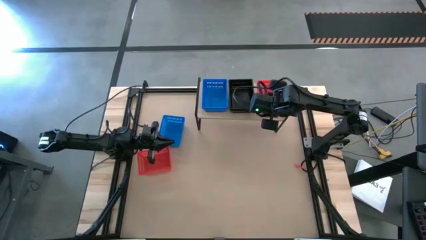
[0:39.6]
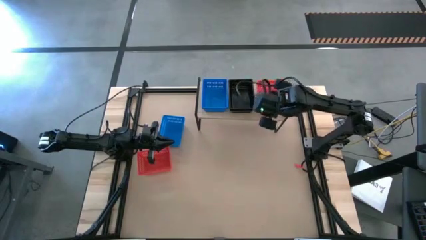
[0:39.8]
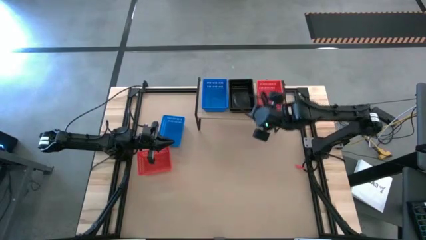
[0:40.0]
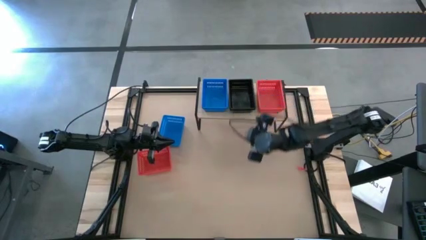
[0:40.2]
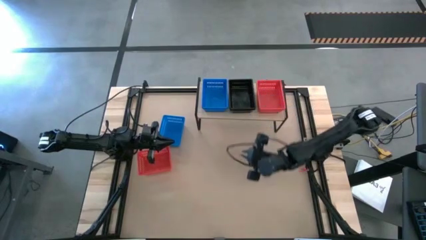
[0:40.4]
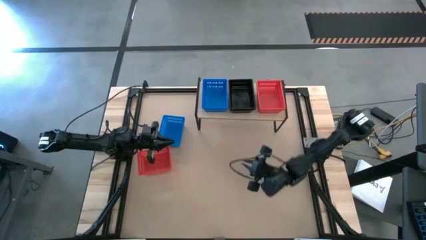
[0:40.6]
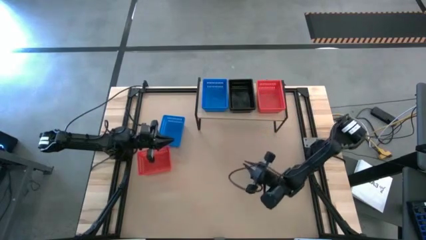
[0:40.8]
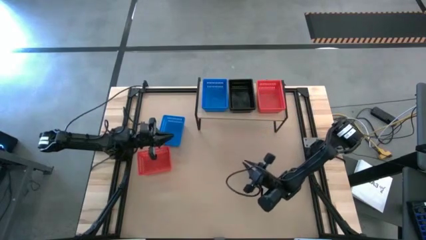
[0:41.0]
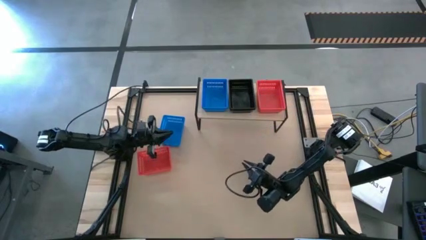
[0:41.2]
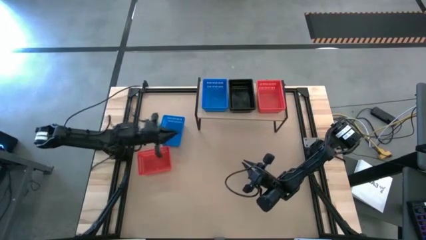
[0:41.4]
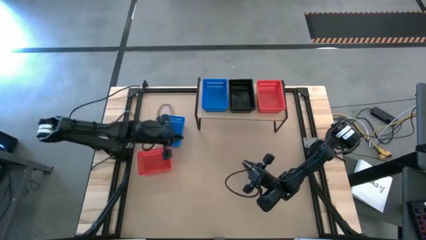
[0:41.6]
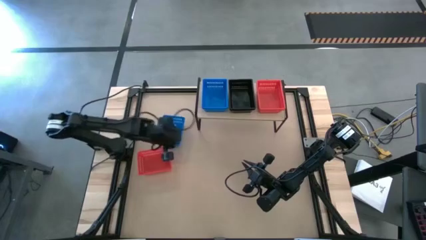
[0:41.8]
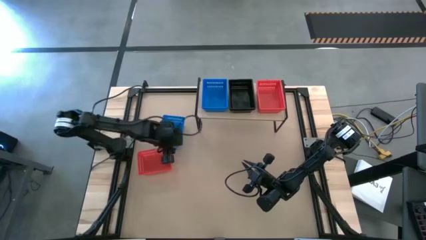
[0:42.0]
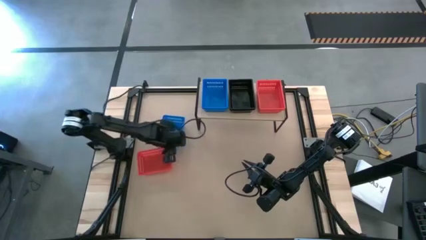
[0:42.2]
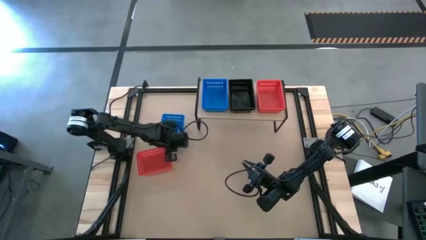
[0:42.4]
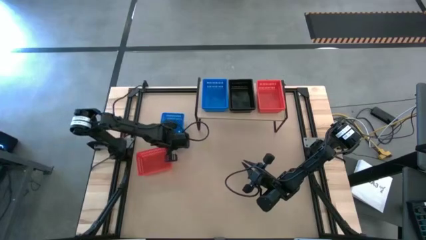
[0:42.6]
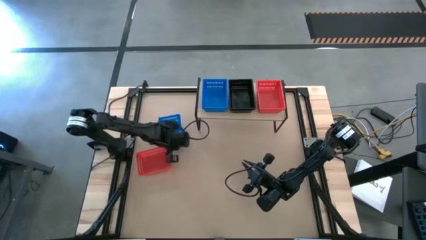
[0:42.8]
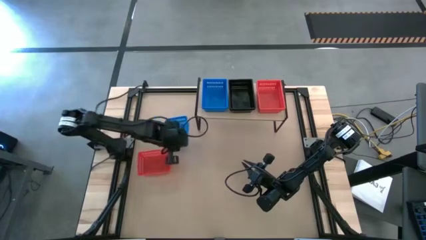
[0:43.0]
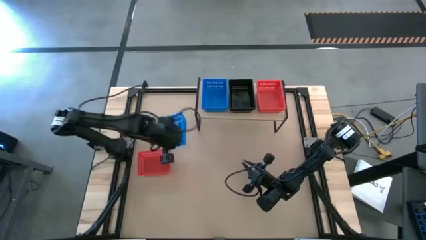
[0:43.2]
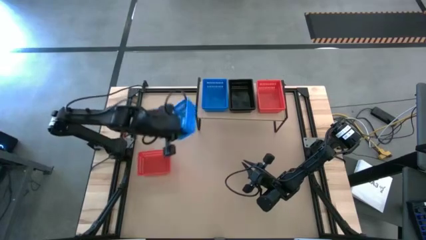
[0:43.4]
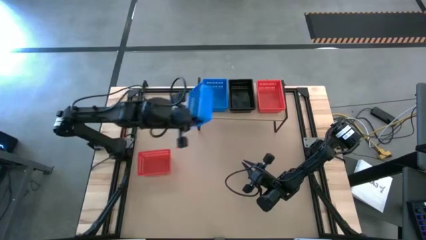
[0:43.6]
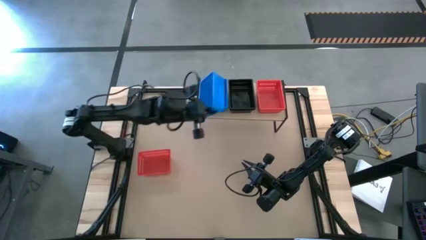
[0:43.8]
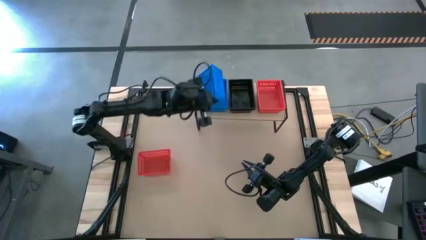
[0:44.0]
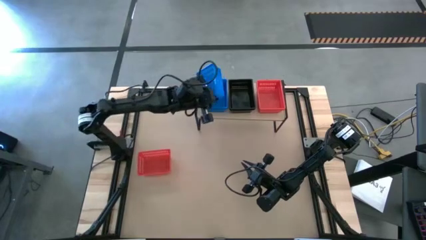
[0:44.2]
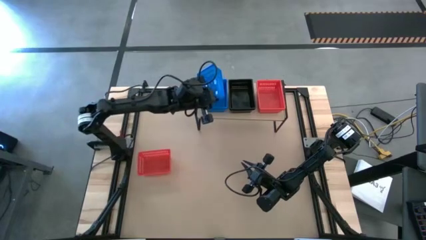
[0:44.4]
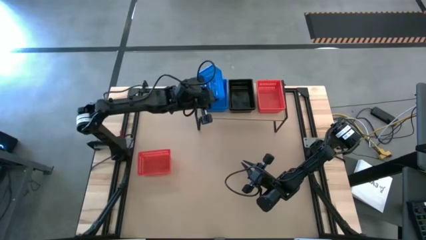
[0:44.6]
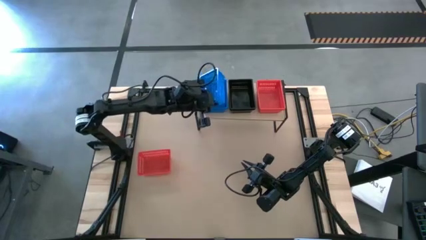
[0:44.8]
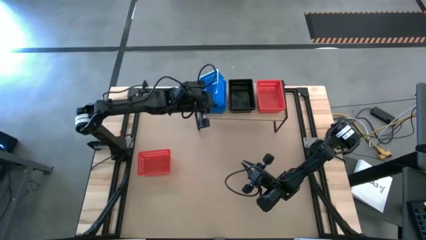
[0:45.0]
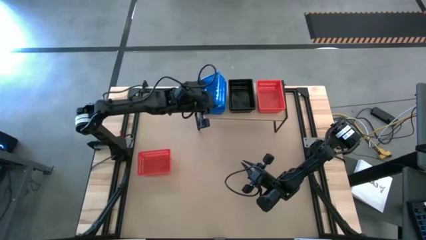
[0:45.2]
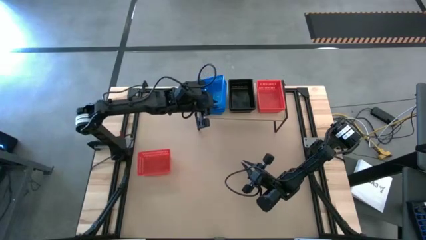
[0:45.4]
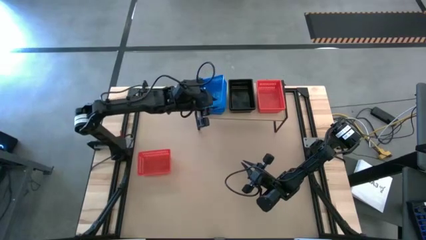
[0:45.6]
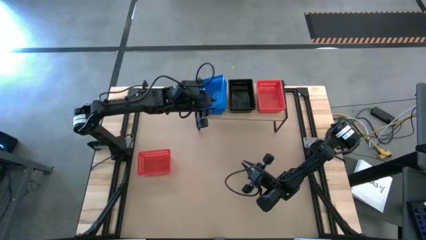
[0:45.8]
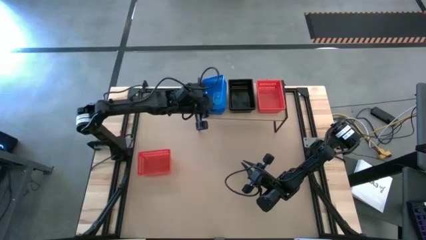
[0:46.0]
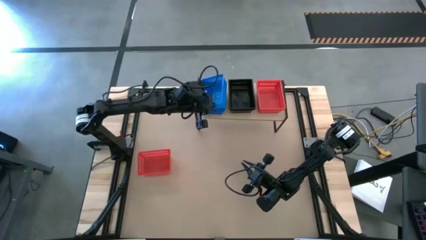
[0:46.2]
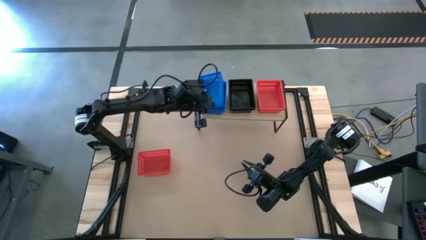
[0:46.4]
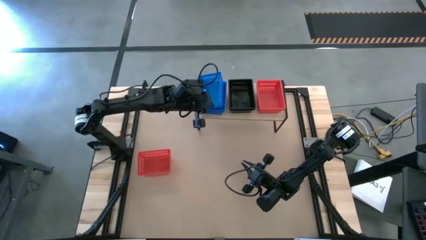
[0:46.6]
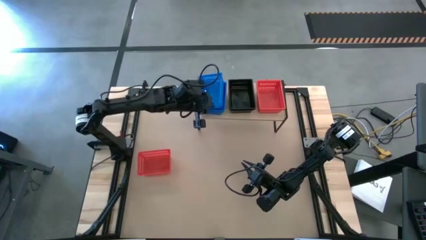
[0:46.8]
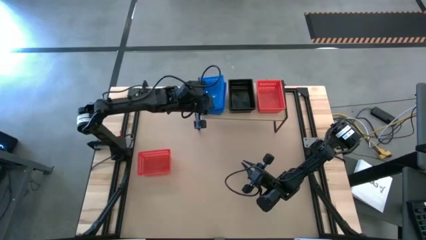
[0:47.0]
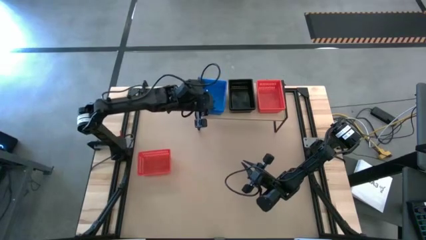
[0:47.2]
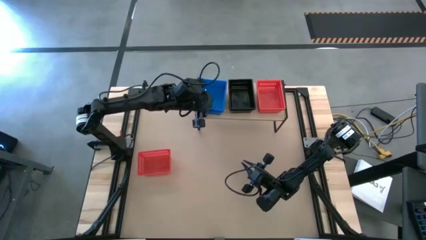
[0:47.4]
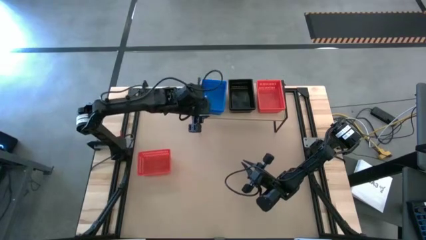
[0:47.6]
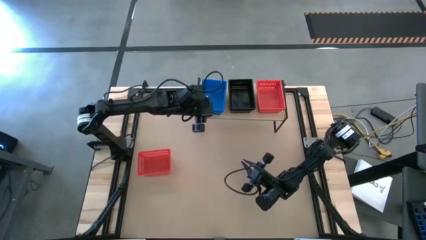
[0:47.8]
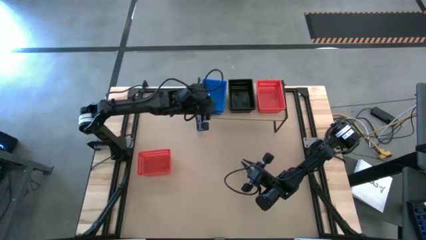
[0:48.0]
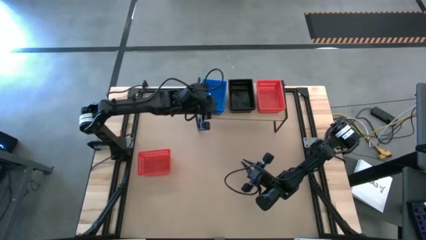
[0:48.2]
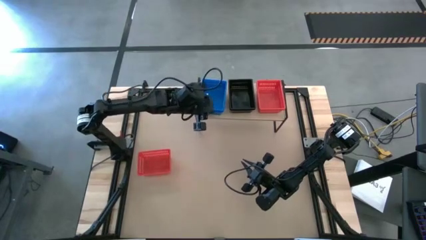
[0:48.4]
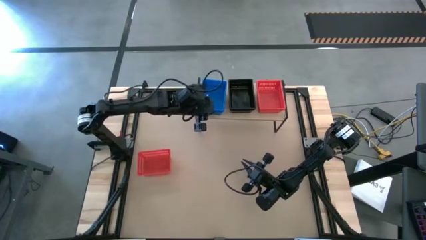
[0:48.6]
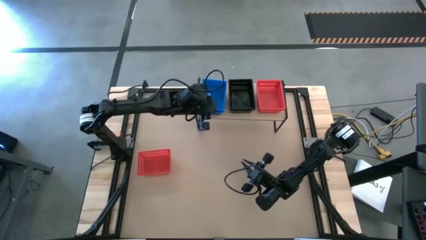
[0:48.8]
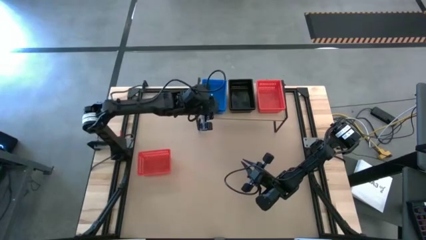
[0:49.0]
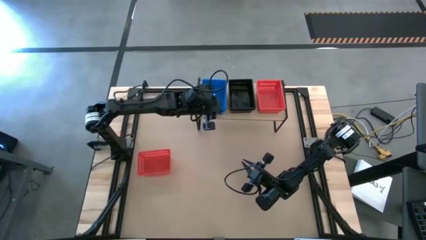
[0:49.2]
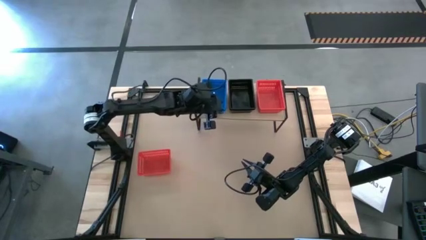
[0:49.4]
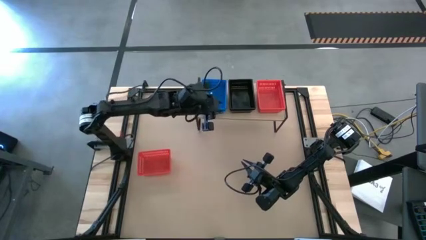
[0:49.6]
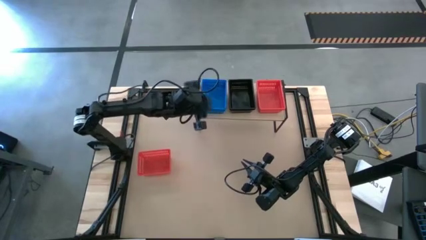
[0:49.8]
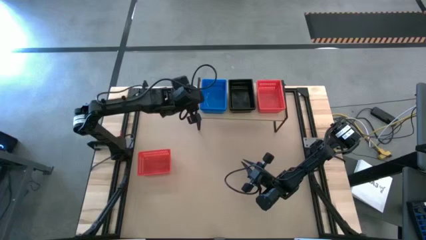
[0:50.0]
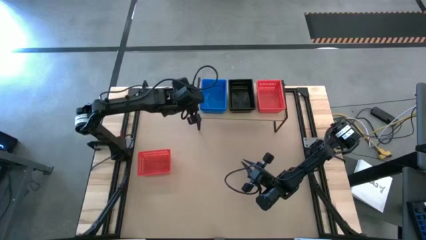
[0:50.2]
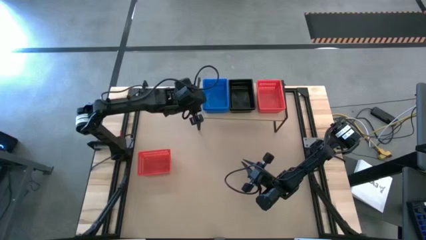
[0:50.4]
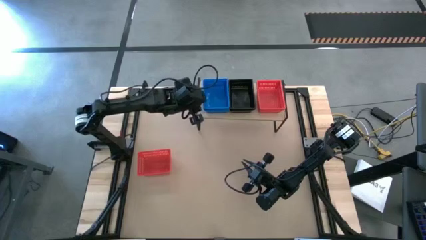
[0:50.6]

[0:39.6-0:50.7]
Task: Stack baskets on shelf by color
Stack the blue basket on top of the stacked blue baskets on the shelf

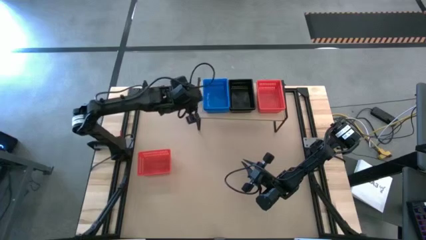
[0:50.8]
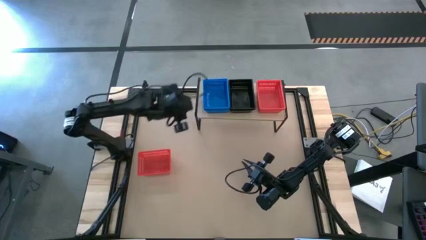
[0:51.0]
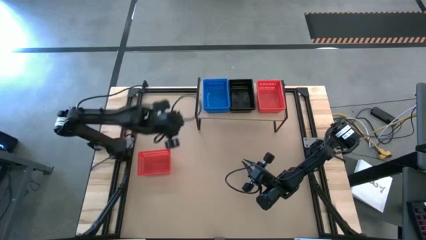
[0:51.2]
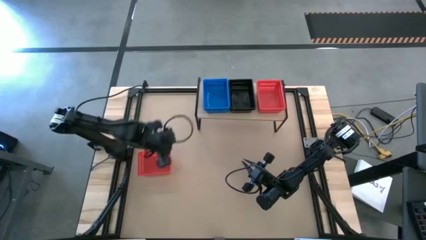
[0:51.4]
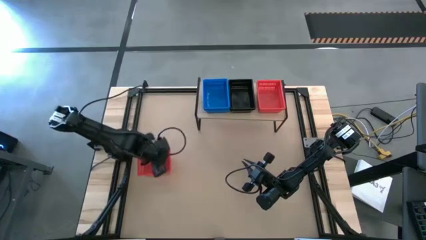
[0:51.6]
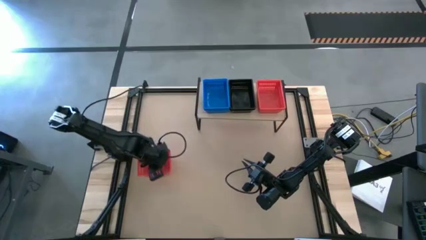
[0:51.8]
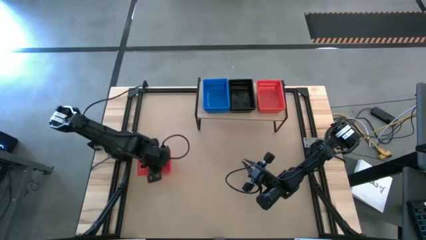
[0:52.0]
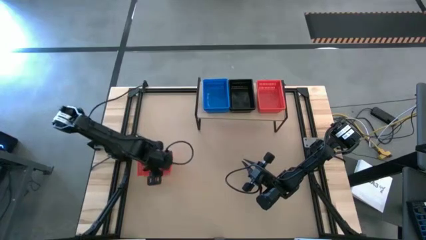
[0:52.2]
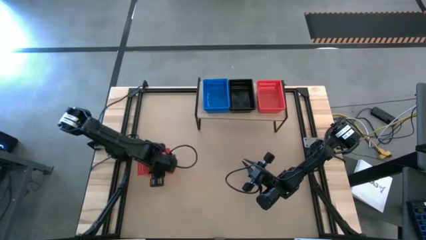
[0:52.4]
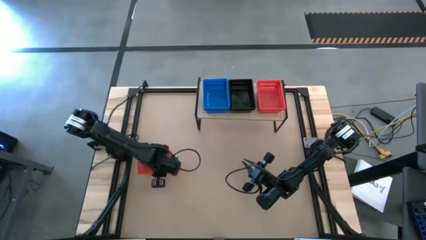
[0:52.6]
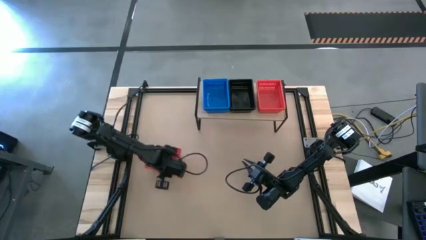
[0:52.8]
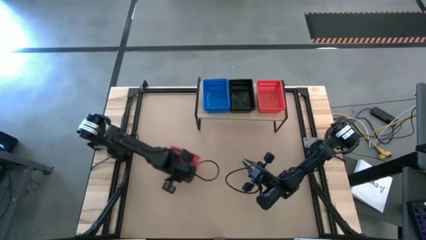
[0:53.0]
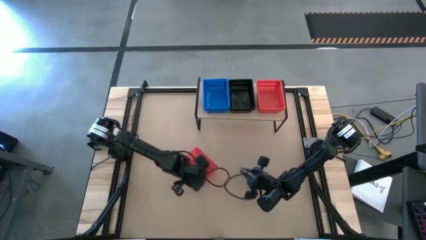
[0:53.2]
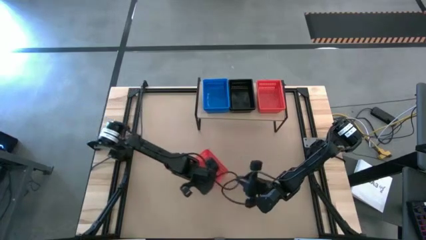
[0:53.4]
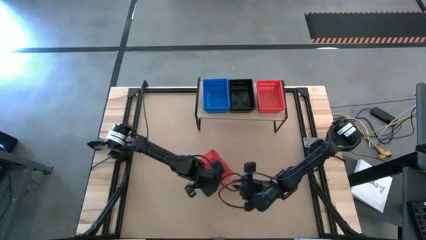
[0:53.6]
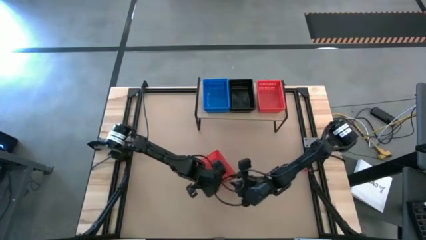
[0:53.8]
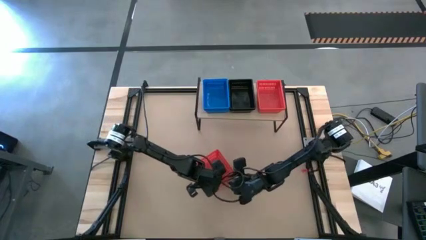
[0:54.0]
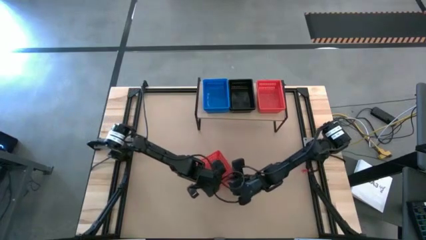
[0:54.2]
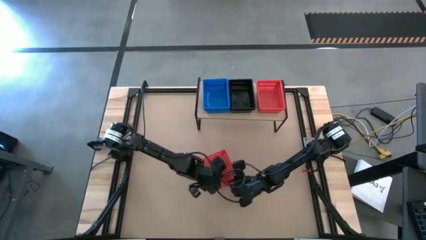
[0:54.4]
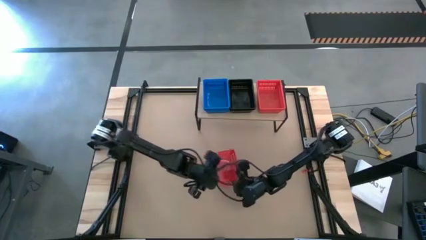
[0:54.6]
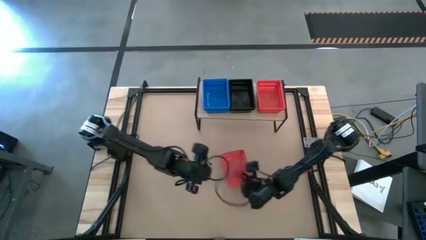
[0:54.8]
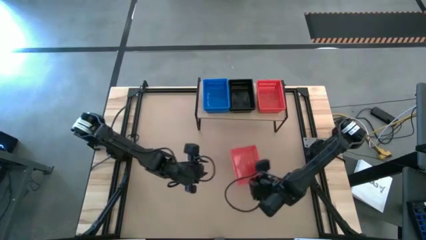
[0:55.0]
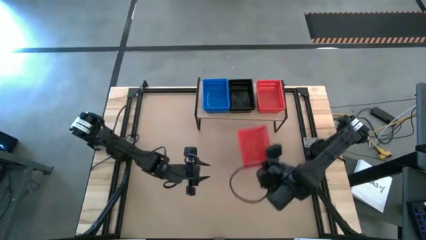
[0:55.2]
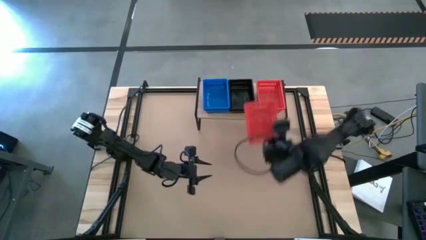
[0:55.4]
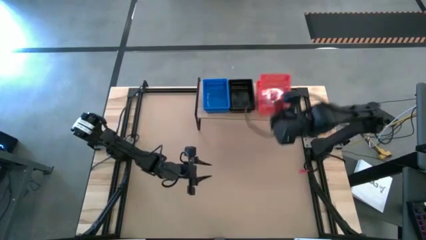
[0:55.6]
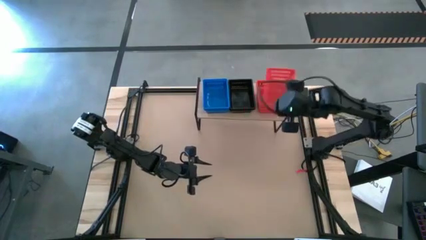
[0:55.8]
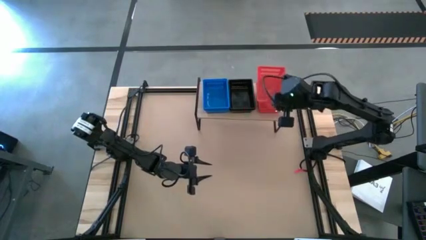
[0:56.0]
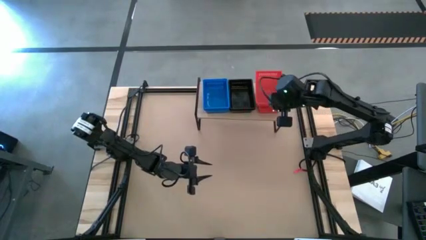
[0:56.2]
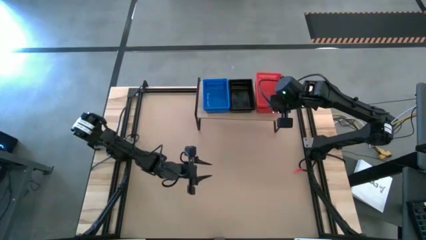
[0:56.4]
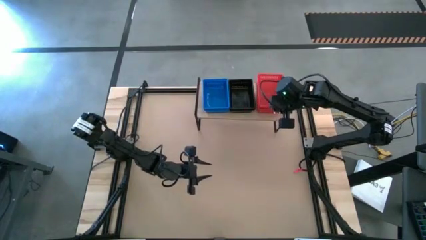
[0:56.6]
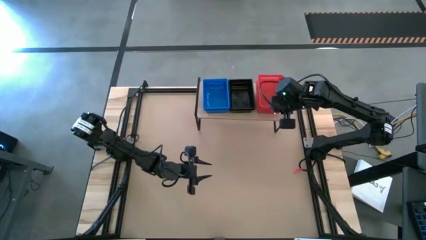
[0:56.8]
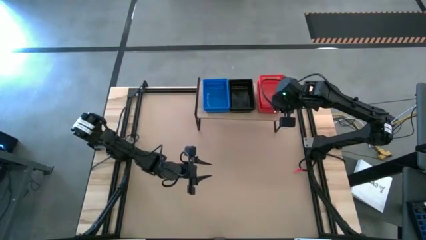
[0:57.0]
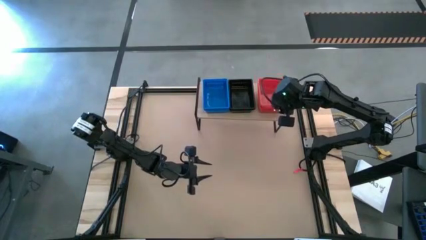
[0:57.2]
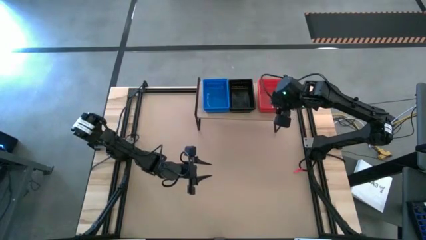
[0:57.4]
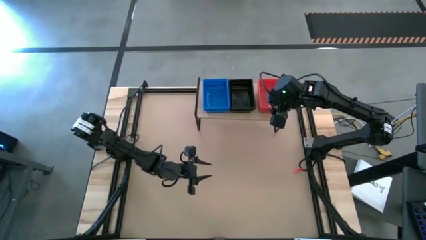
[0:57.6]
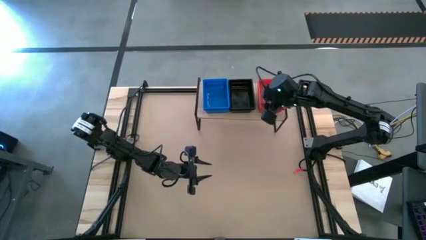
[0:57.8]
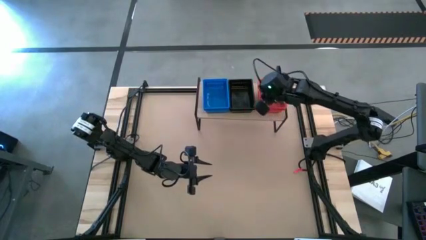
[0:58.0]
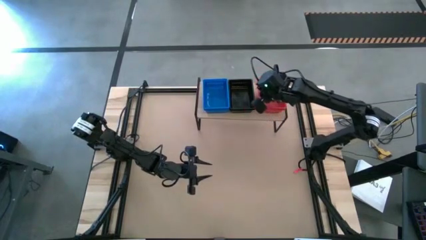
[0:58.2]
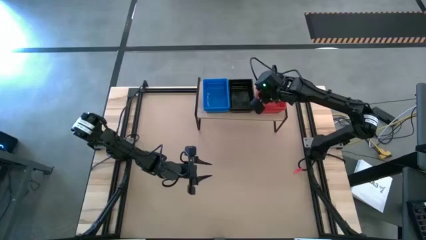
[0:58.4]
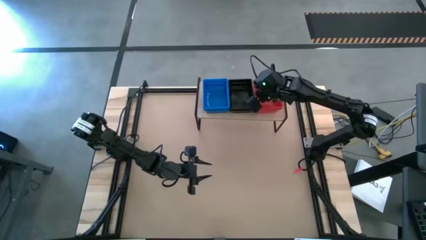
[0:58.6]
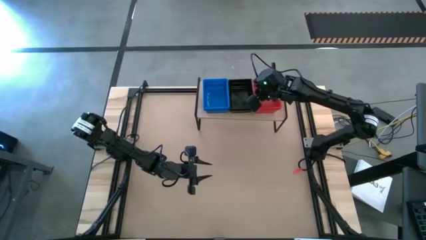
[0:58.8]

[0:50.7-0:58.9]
Stack the red basket on top of the stacked red baskets on the shelf
